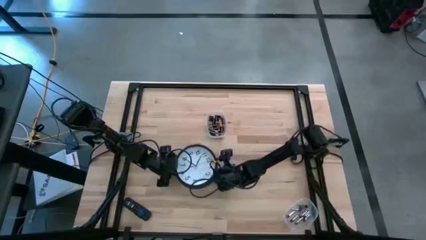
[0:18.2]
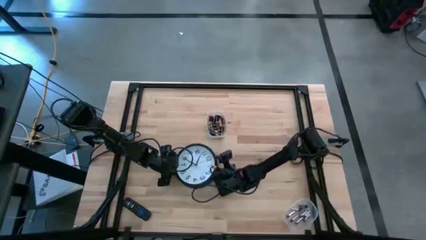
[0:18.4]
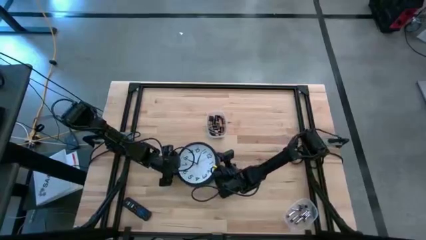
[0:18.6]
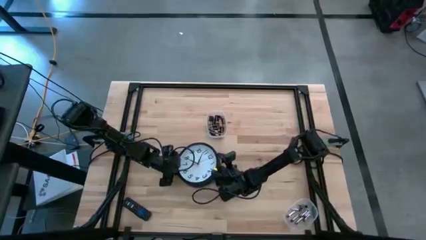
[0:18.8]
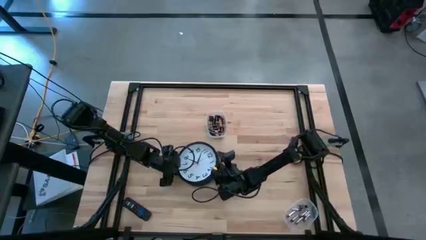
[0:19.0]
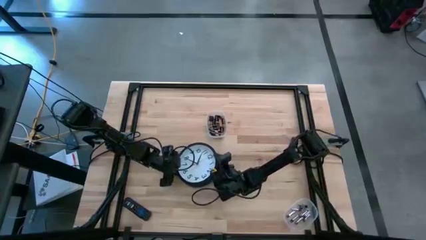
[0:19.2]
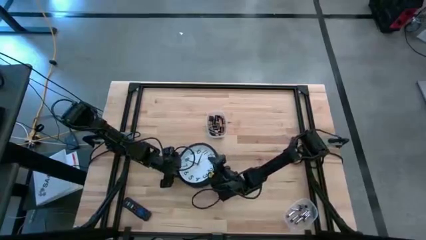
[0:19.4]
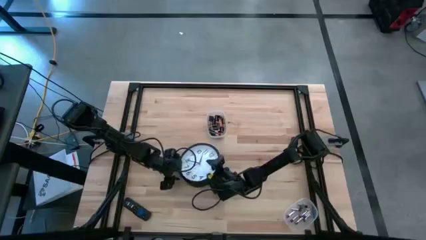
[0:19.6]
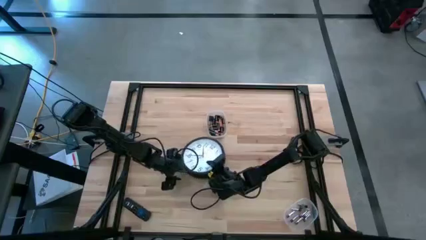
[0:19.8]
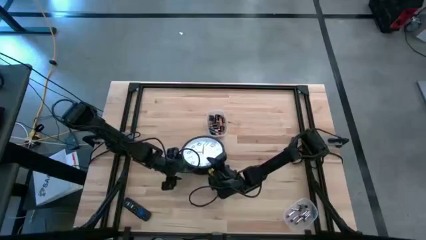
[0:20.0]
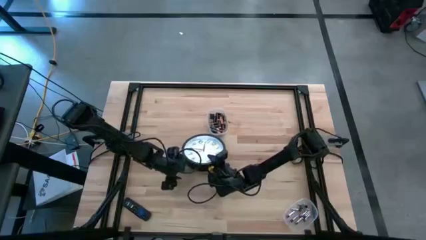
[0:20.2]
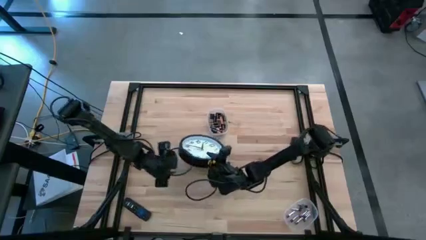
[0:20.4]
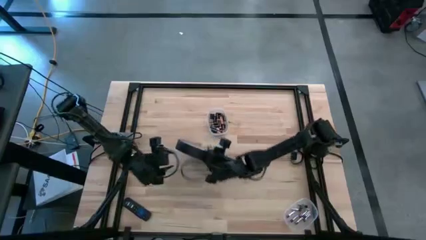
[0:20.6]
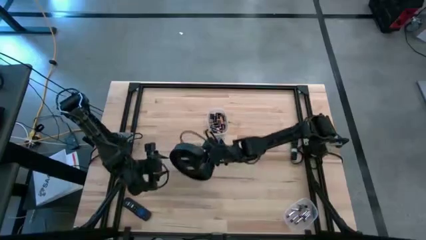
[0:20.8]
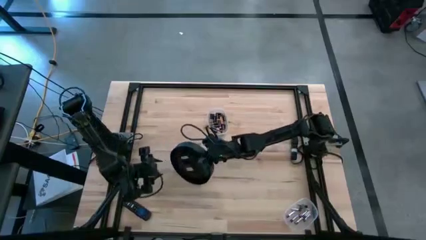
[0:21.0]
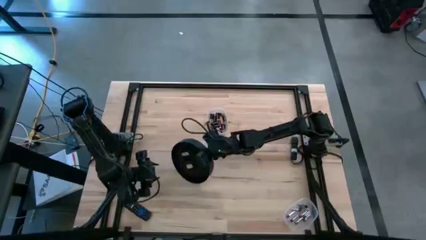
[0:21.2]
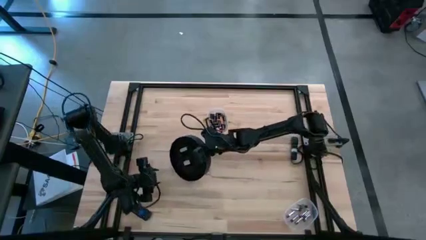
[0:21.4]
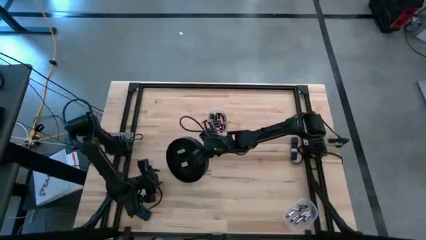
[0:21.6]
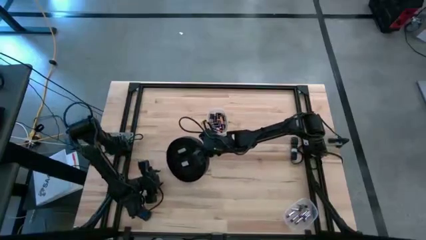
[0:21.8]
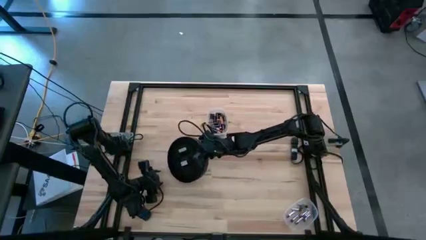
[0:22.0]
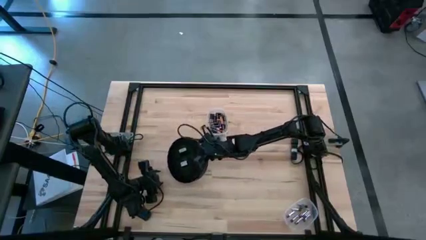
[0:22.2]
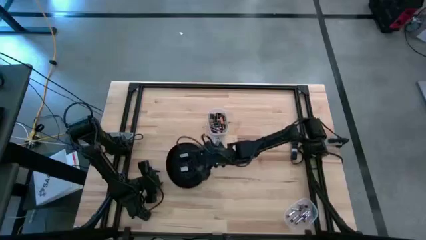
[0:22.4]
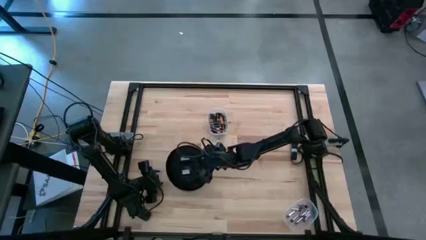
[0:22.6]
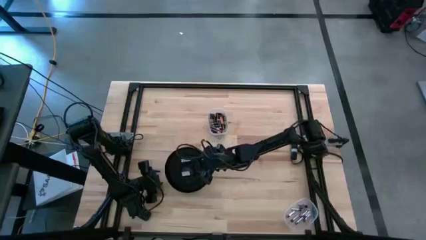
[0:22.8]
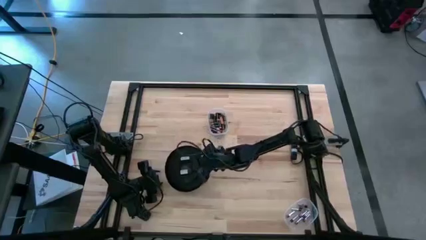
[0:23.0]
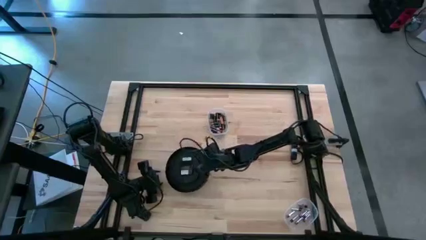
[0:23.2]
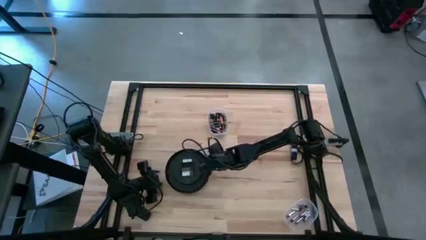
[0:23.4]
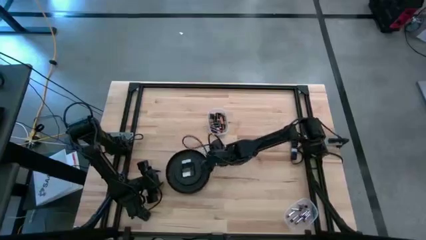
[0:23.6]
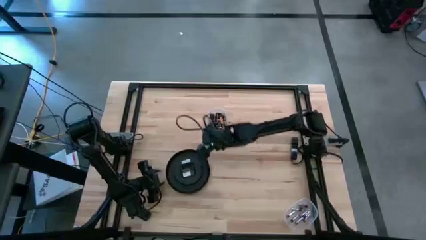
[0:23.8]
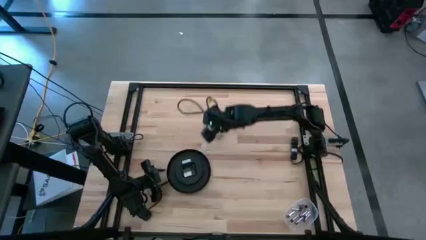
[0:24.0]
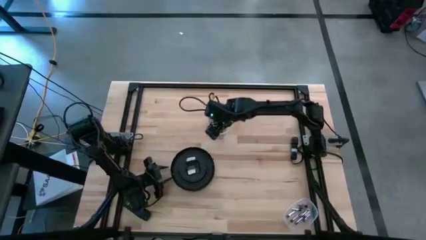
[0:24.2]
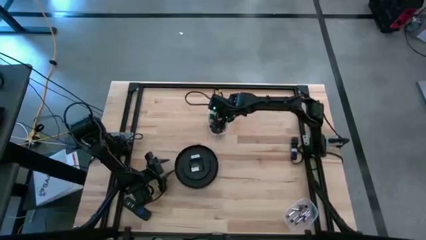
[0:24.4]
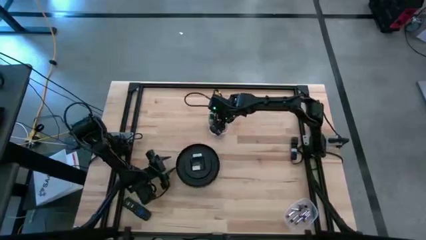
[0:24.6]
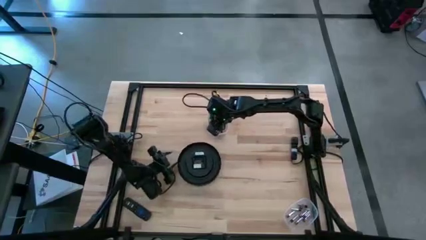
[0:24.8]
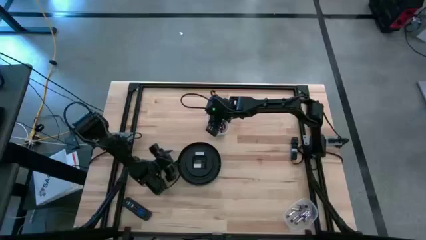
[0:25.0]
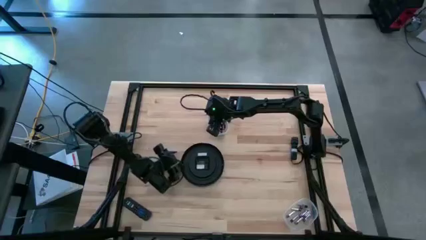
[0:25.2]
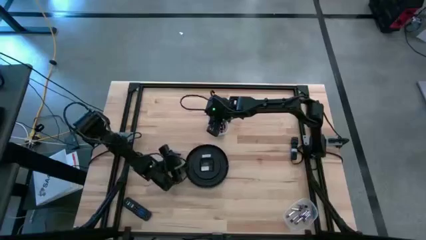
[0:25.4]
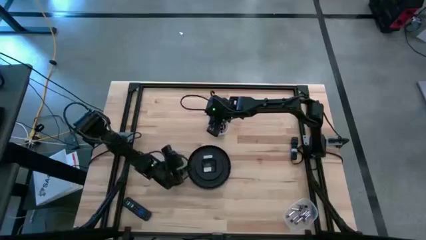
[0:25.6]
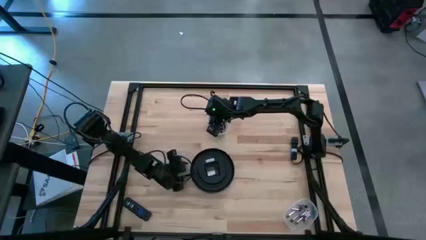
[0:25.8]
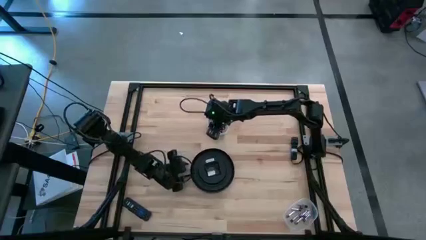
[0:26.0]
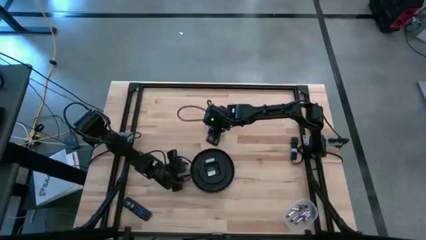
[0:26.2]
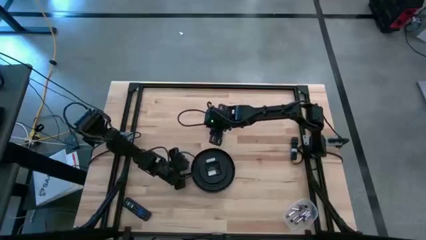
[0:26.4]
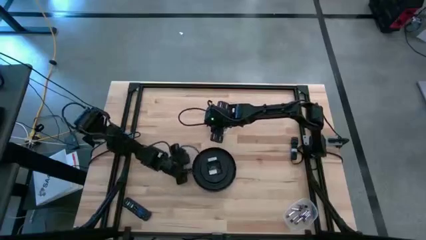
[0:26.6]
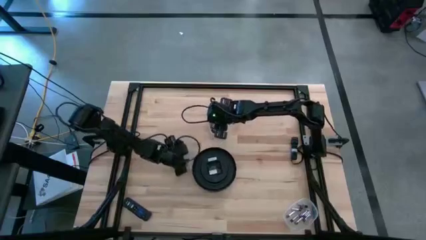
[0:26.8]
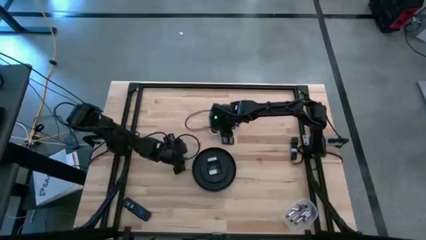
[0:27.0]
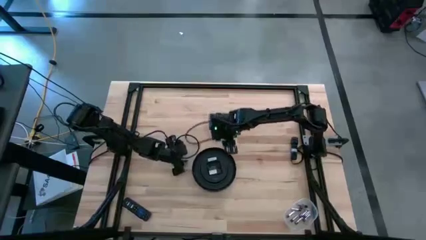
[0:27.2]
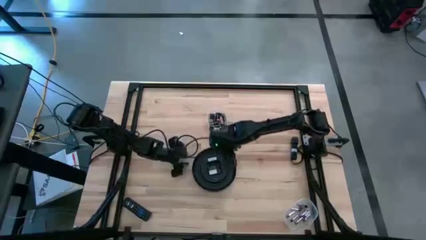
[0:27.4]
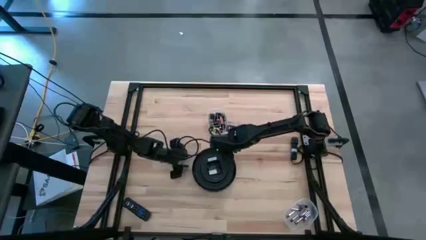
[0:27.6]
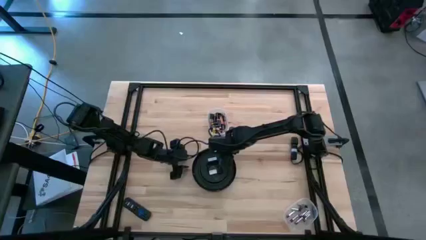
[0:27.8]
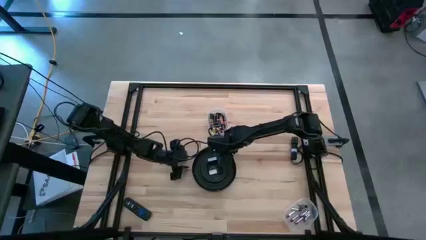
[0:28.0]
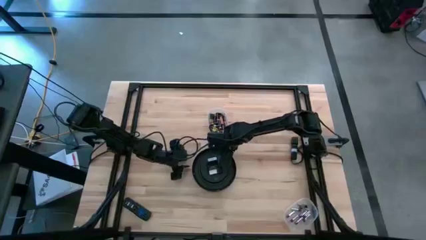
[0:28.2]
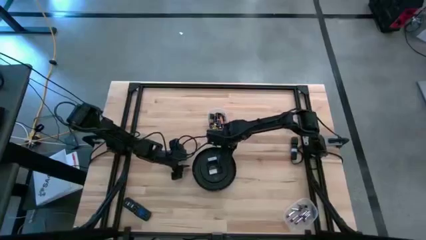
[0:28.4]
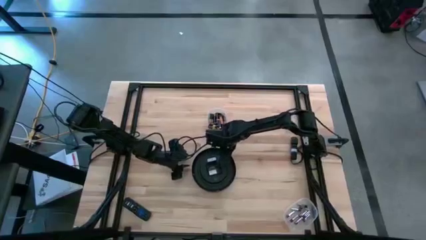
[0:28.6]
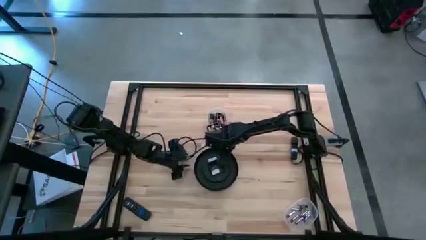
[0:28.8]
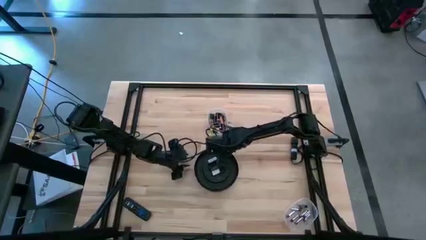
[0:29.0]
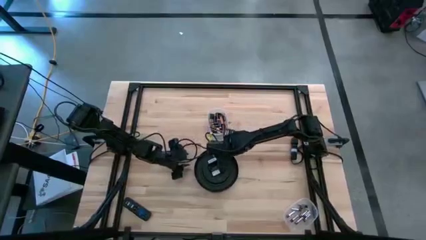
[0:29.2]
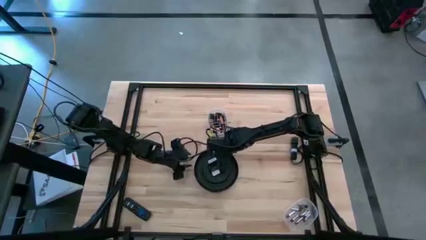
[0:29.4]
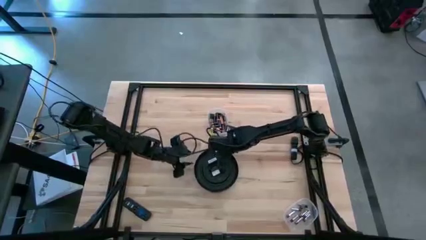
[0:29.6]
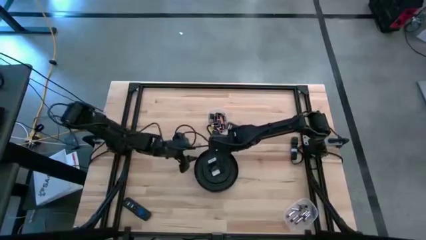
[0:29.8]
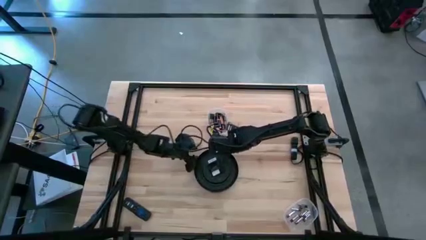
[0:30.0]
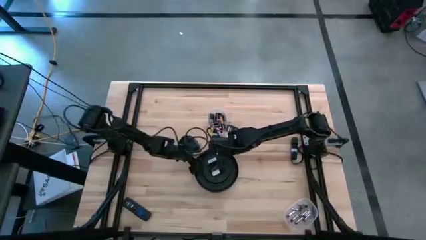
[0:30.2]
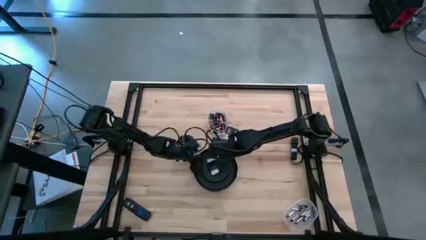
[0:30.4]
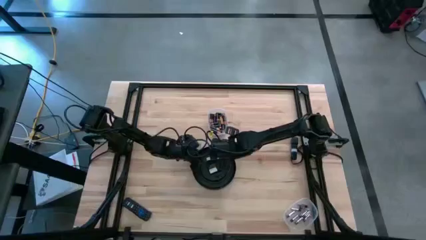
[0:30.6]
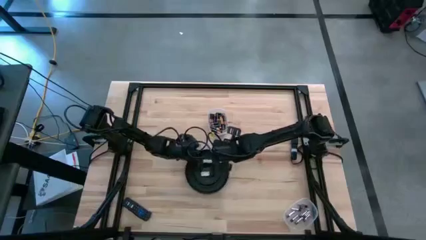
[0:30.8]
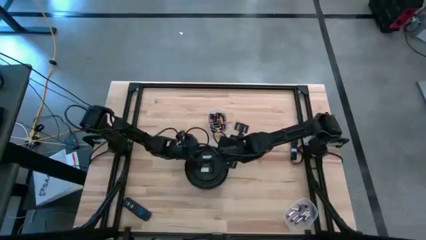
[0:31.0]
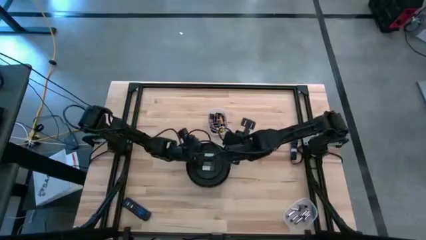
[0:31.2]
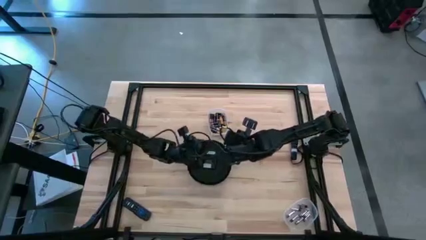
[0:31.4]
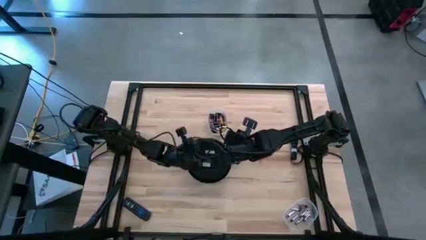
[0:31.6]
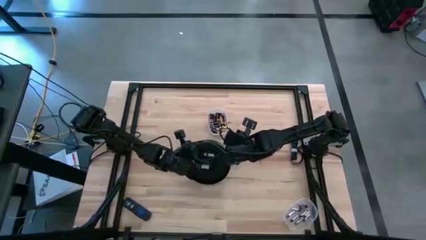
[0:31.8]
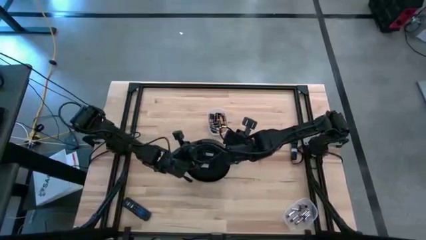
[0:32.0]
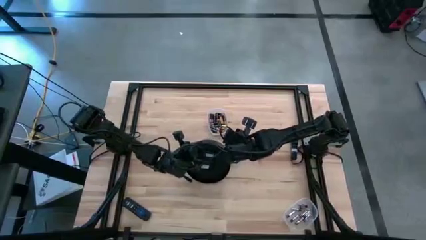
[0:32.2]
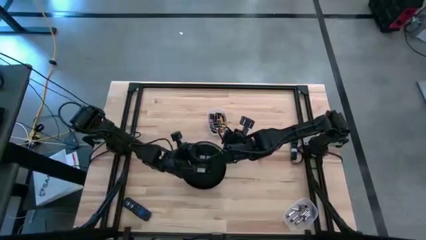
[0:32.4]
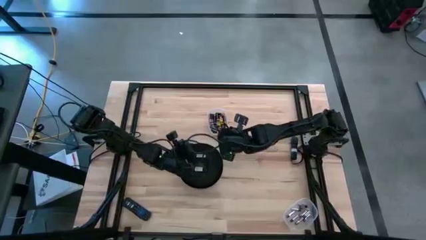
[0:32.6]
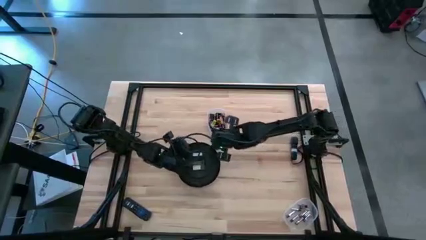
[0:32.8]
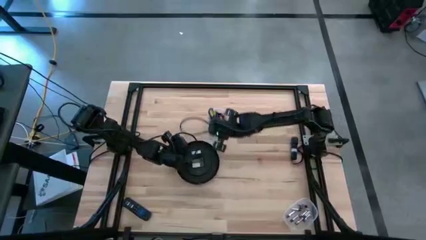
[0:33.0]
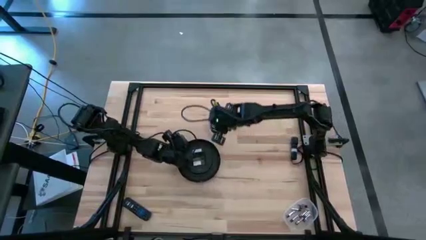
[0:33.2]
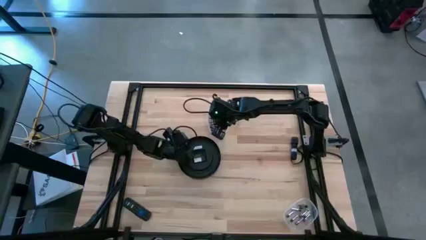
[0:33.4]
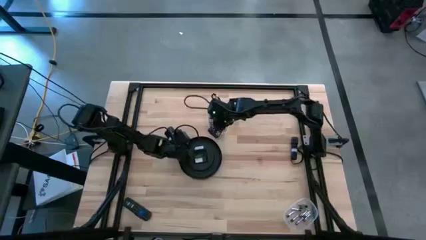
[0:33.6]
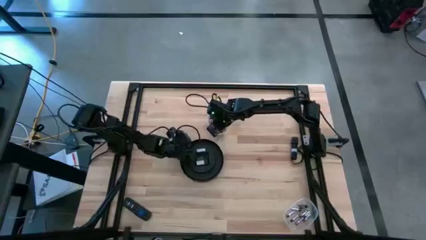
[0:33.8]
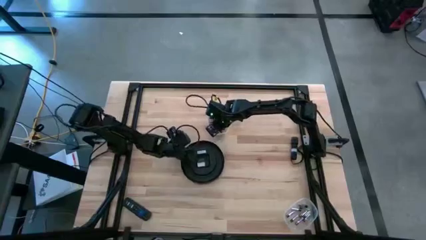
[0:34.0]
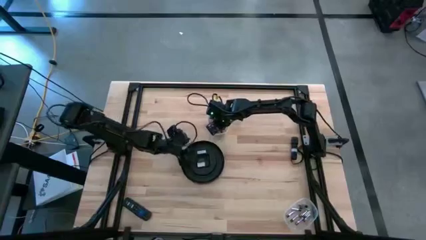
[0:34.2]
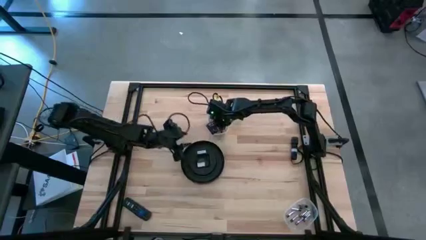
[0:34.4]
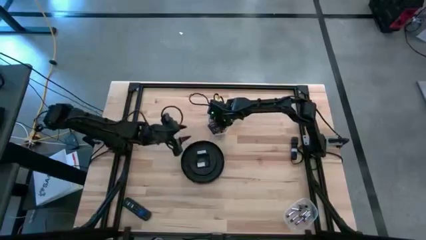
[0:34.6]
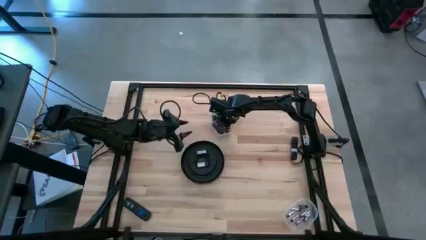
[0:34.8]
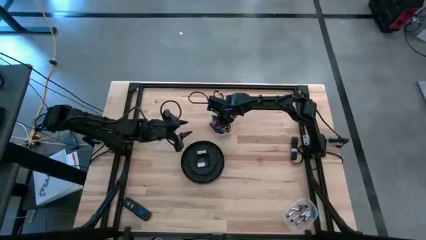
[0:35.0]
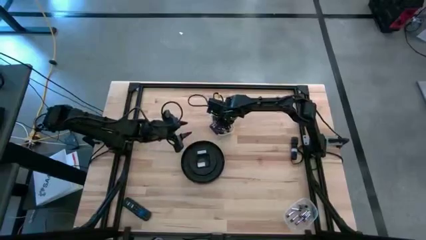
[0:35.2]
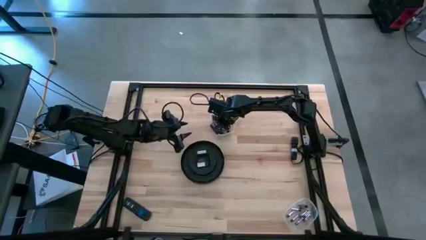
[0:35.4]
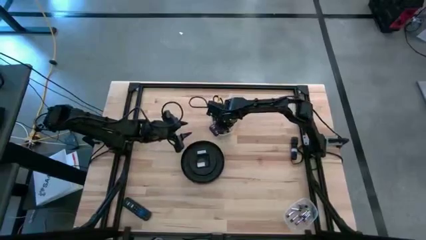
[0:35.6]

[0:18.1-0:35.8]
Task: Insert battery
Insert the black battery into the black clock
